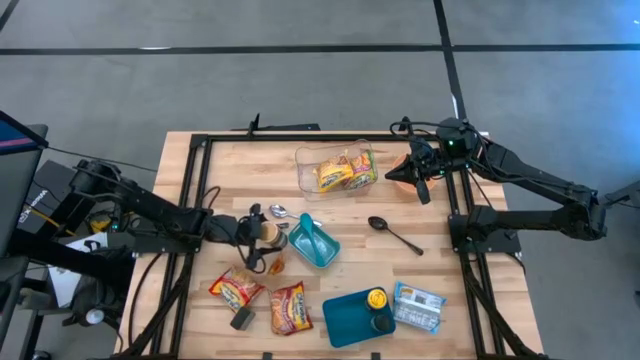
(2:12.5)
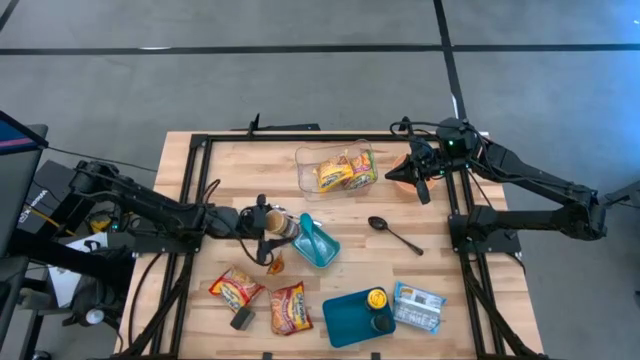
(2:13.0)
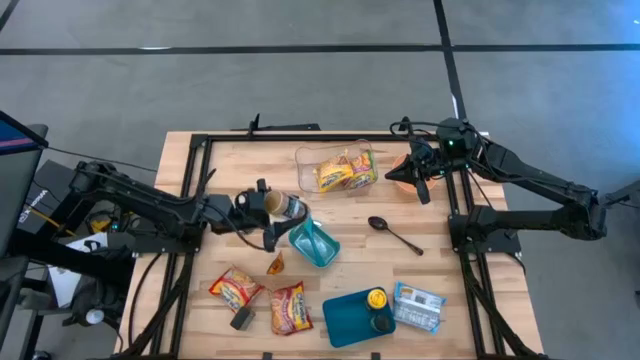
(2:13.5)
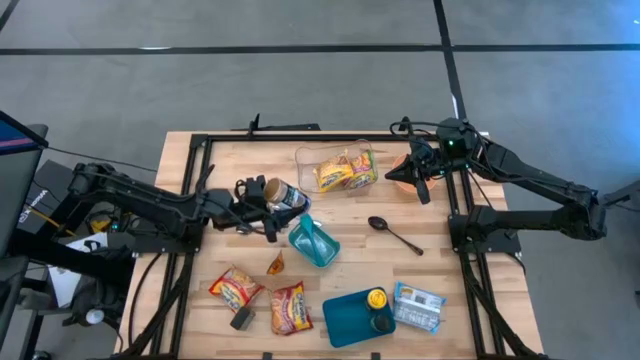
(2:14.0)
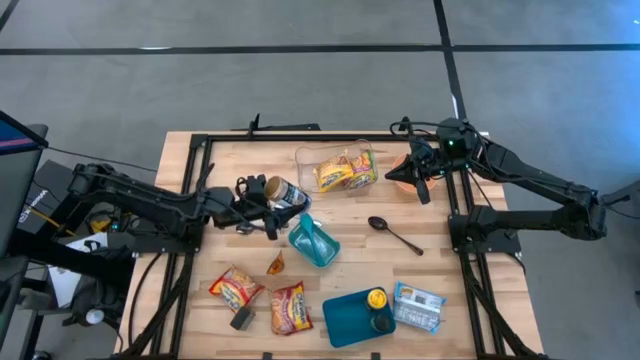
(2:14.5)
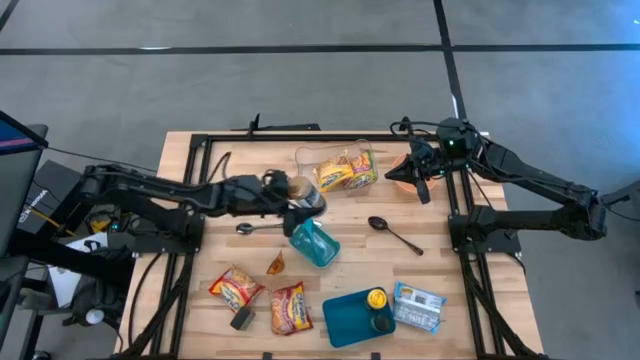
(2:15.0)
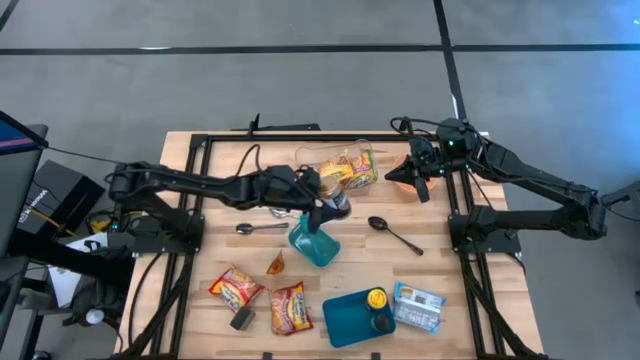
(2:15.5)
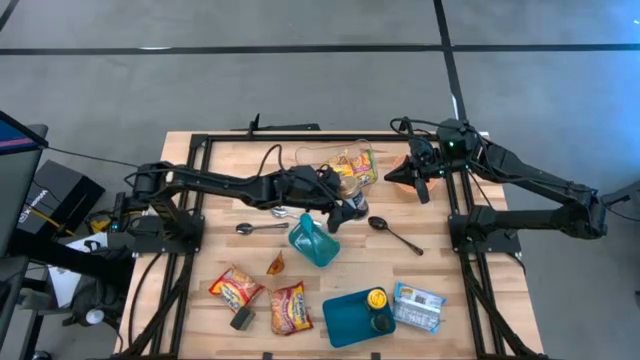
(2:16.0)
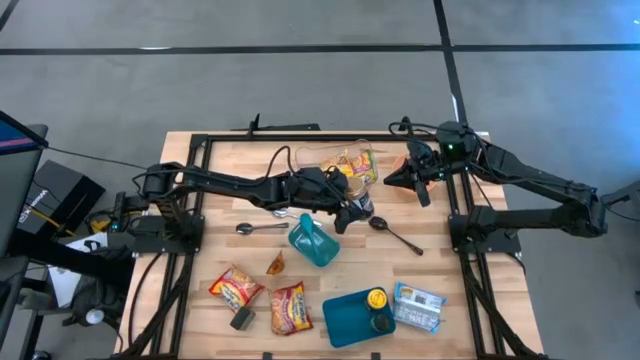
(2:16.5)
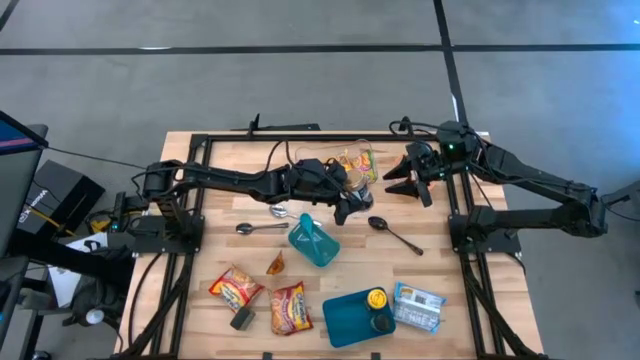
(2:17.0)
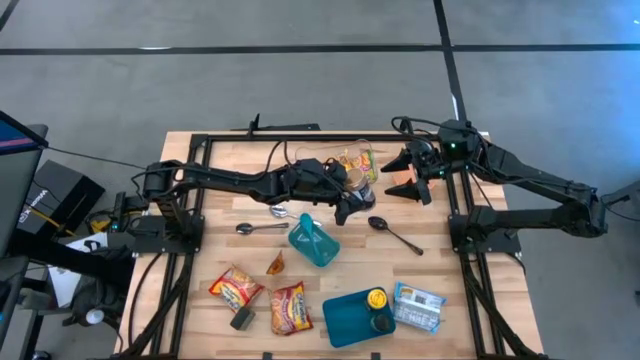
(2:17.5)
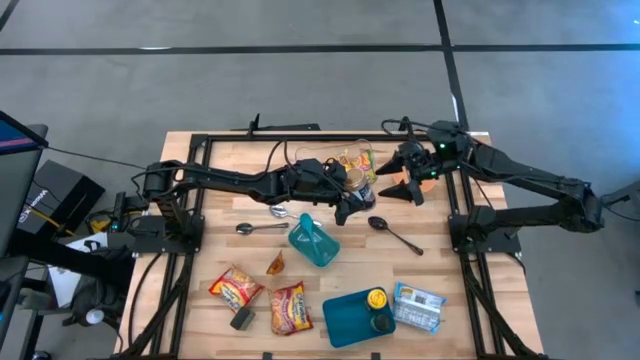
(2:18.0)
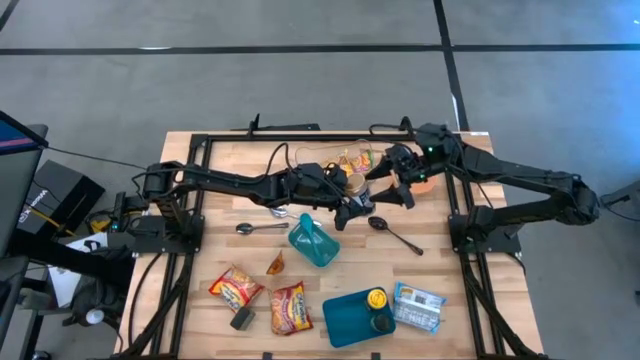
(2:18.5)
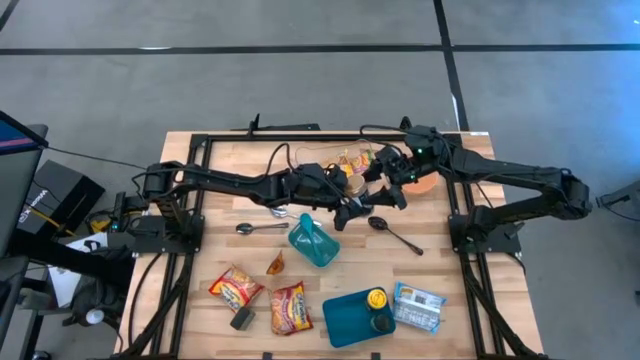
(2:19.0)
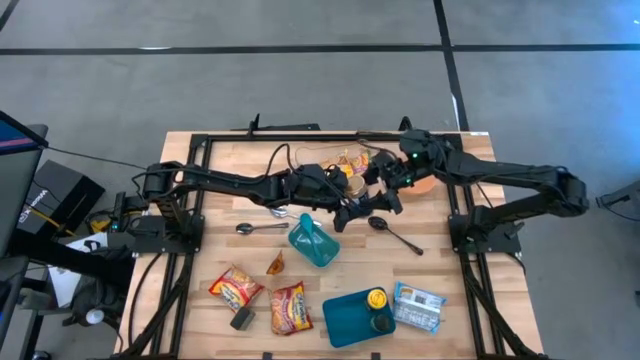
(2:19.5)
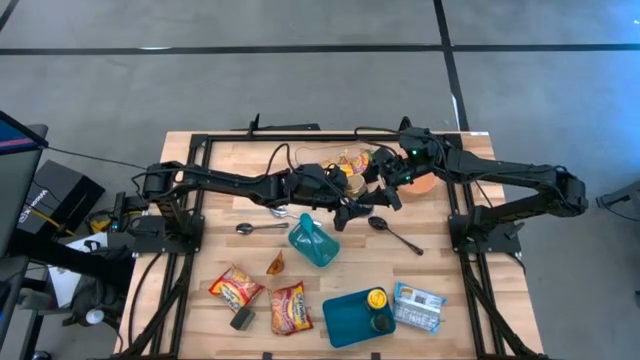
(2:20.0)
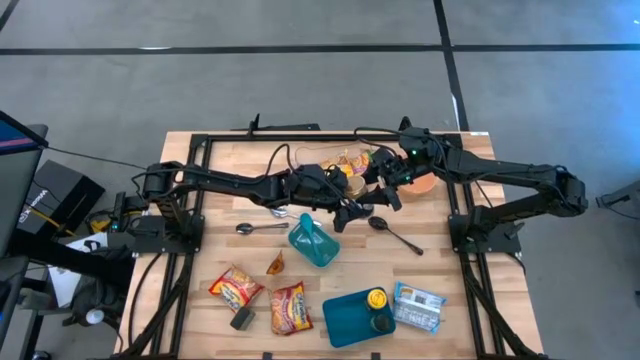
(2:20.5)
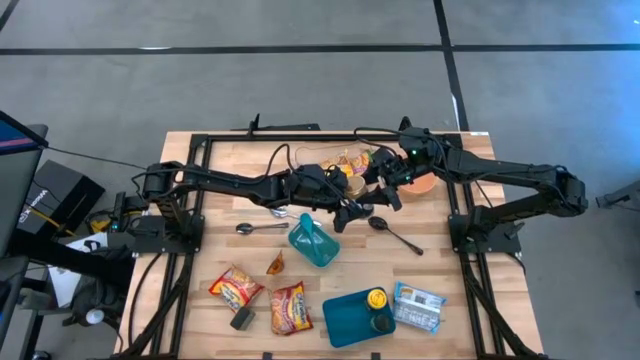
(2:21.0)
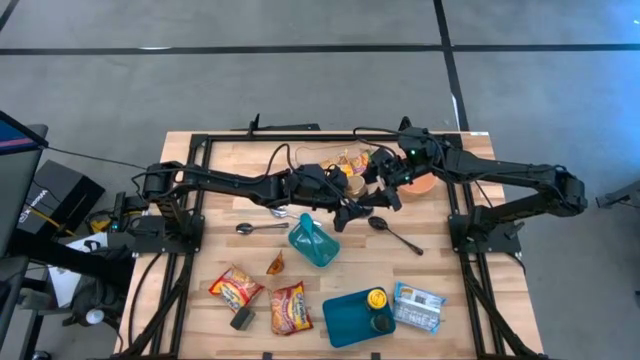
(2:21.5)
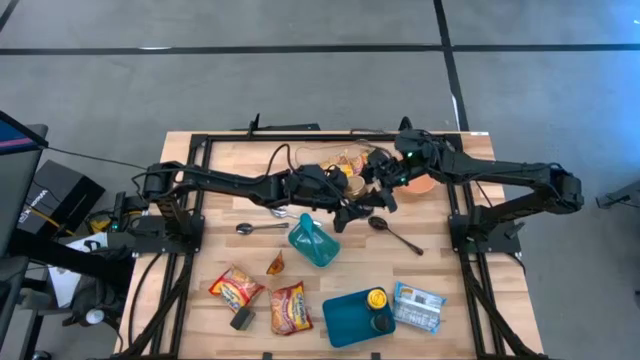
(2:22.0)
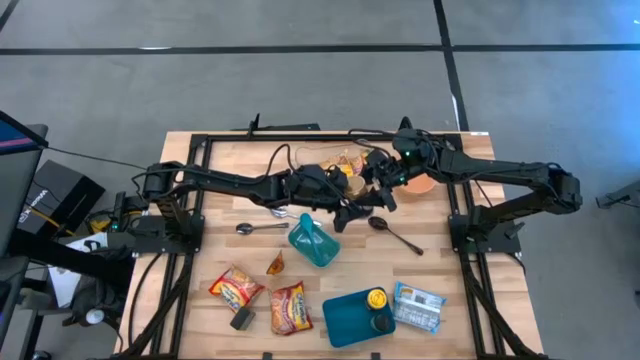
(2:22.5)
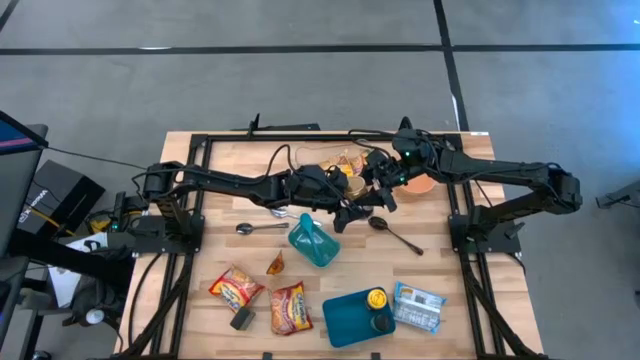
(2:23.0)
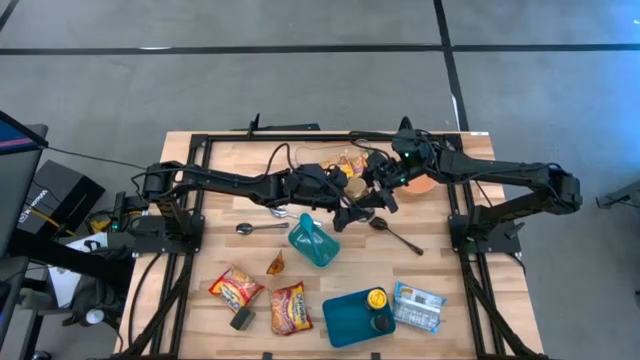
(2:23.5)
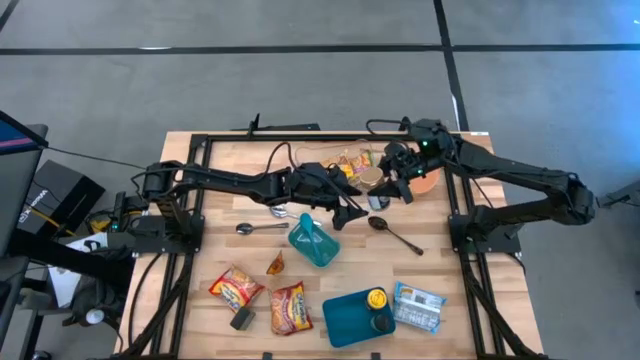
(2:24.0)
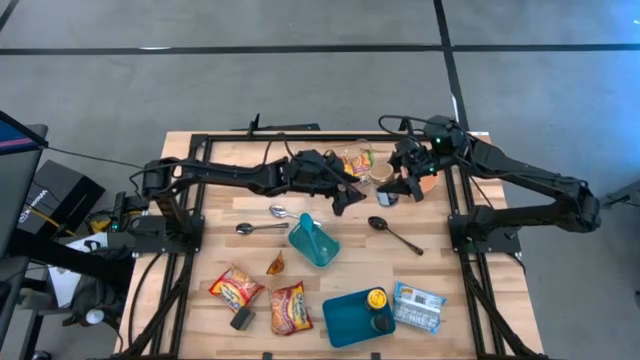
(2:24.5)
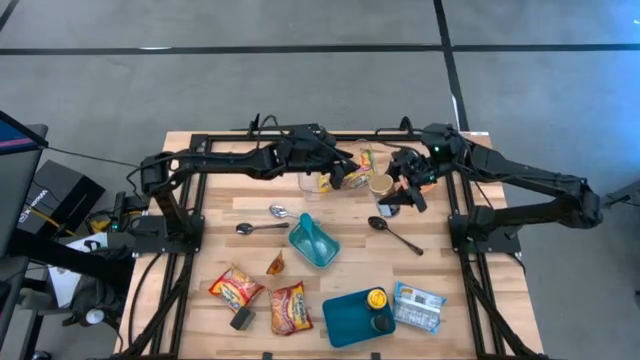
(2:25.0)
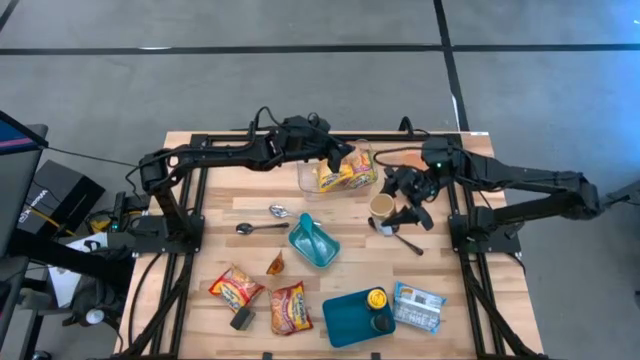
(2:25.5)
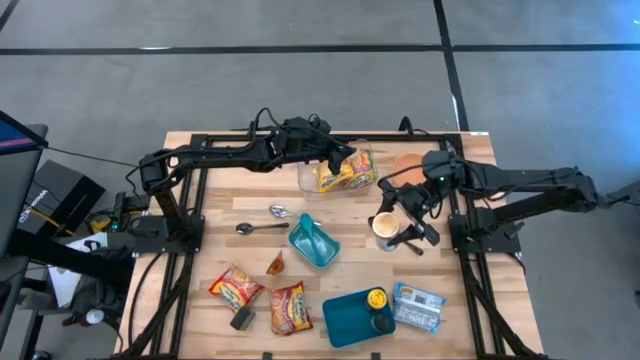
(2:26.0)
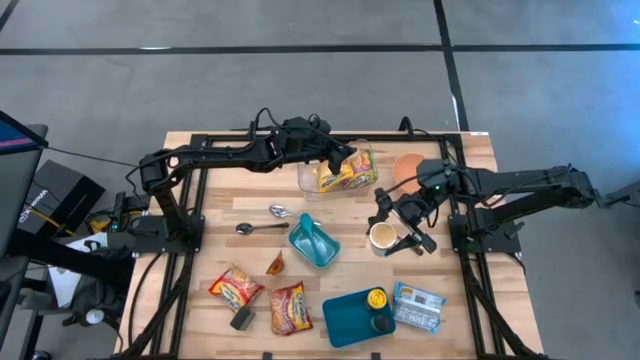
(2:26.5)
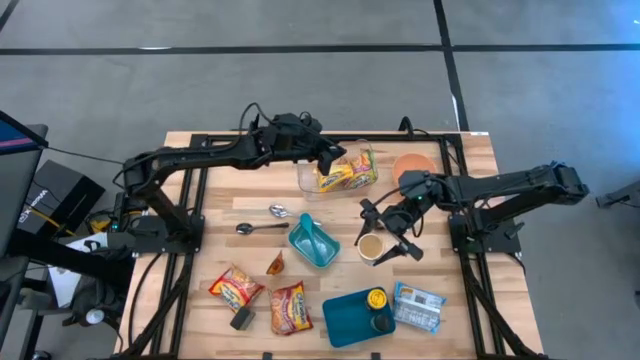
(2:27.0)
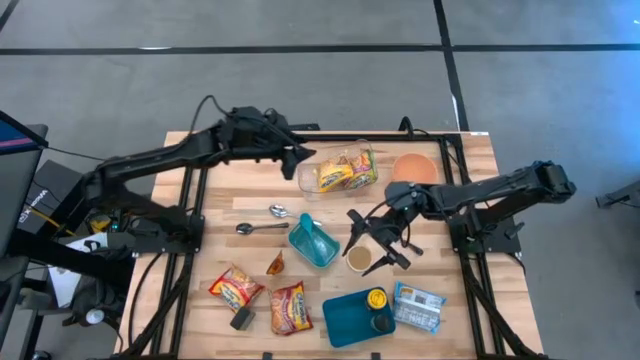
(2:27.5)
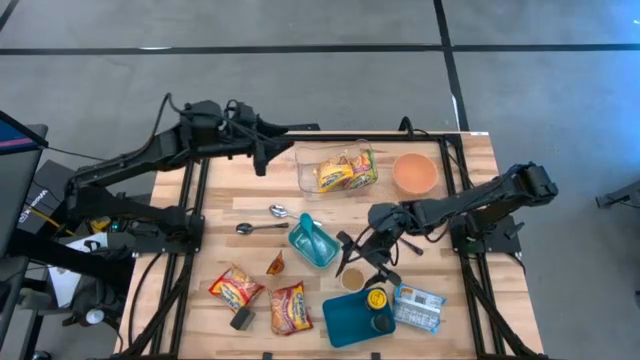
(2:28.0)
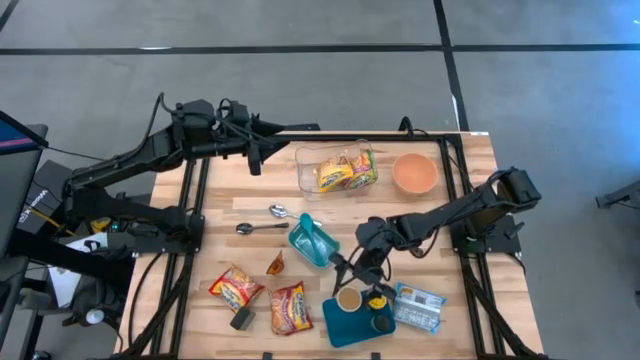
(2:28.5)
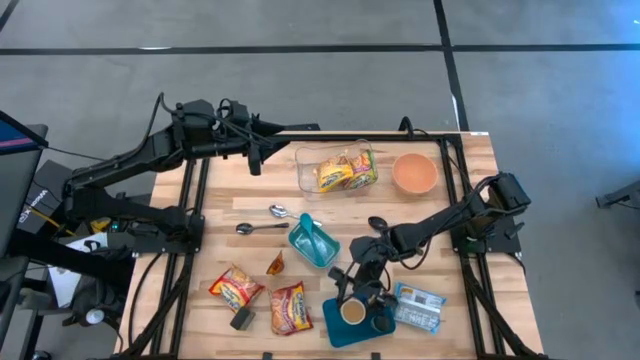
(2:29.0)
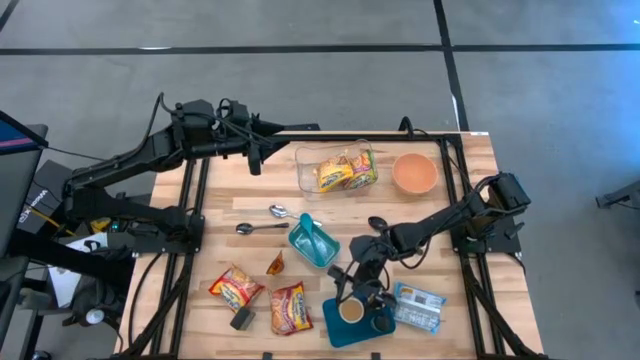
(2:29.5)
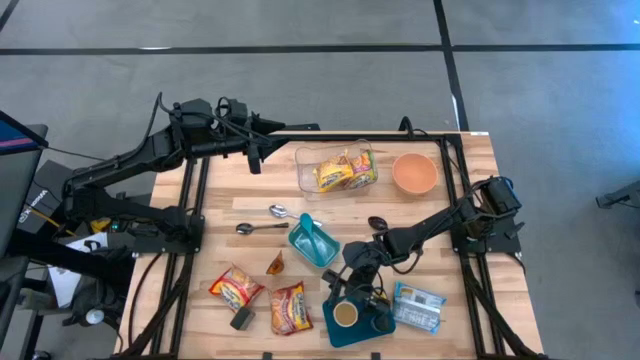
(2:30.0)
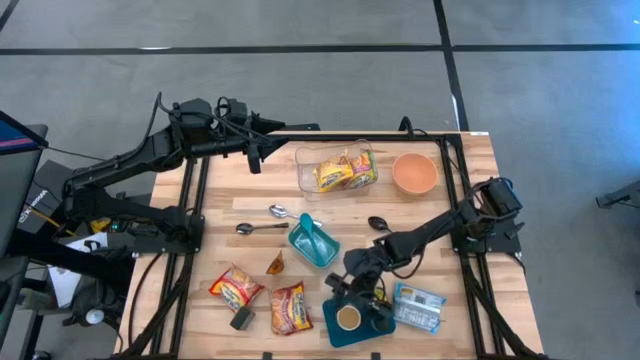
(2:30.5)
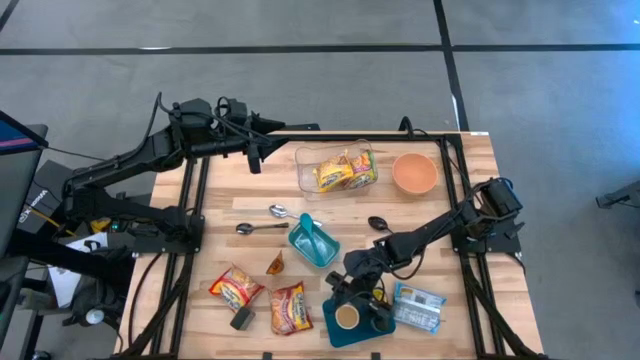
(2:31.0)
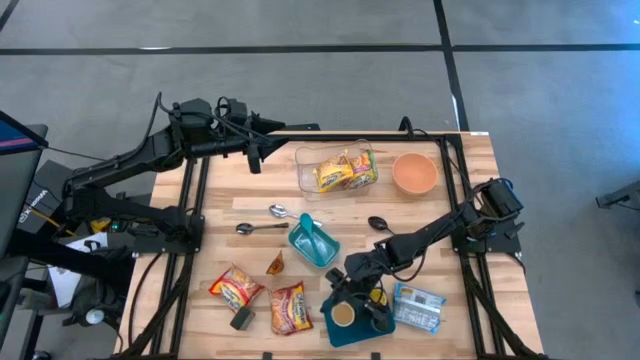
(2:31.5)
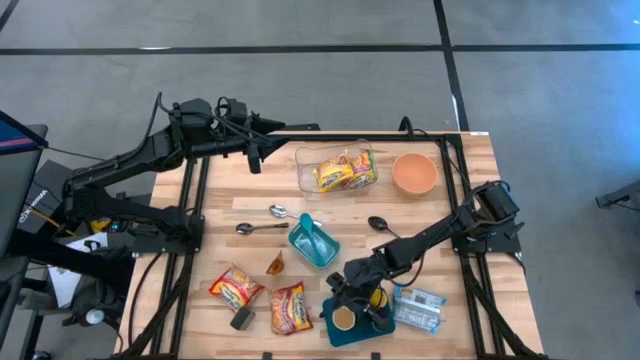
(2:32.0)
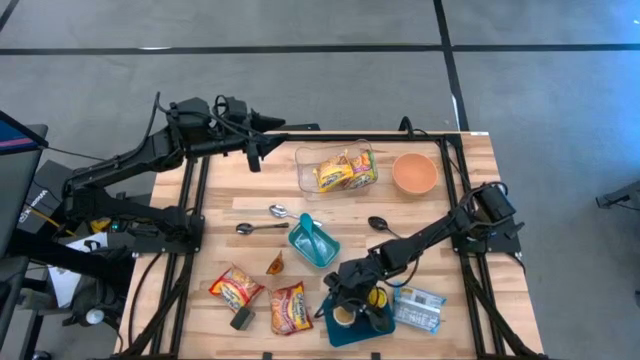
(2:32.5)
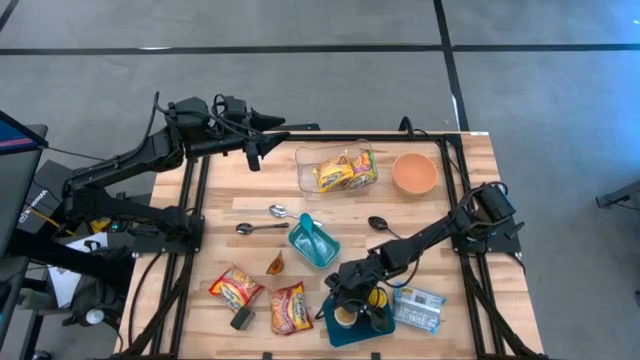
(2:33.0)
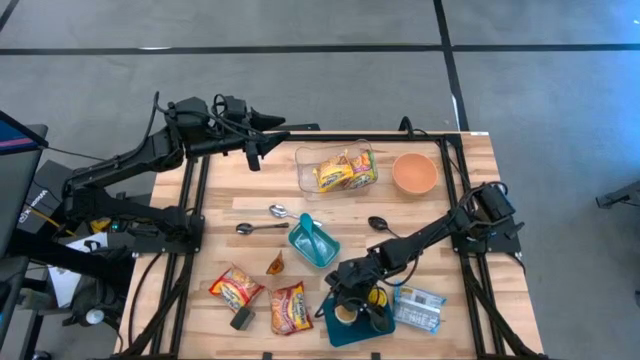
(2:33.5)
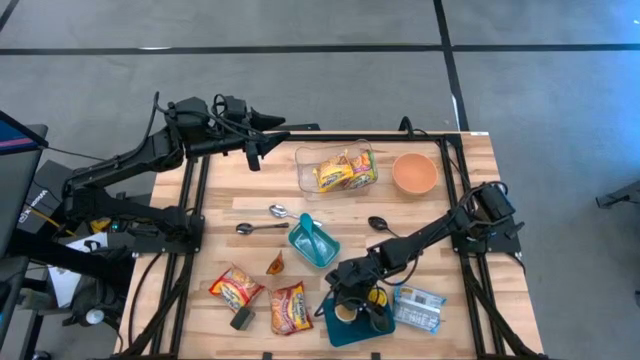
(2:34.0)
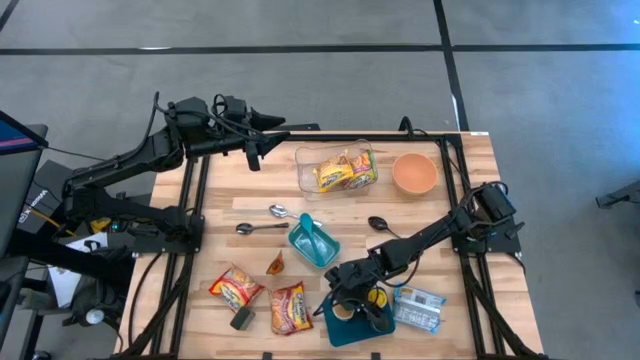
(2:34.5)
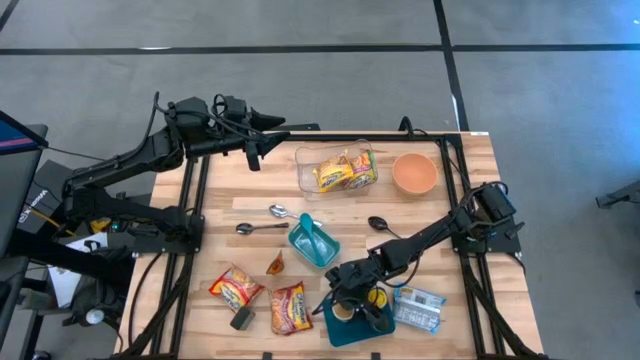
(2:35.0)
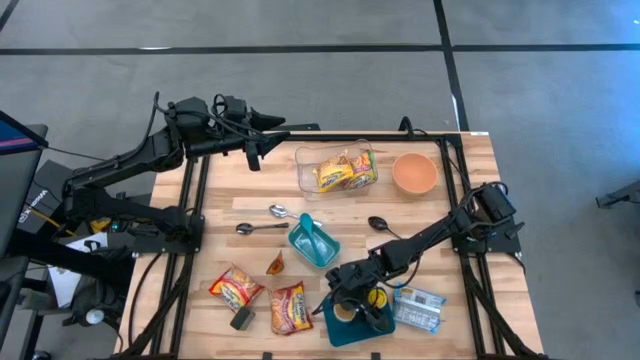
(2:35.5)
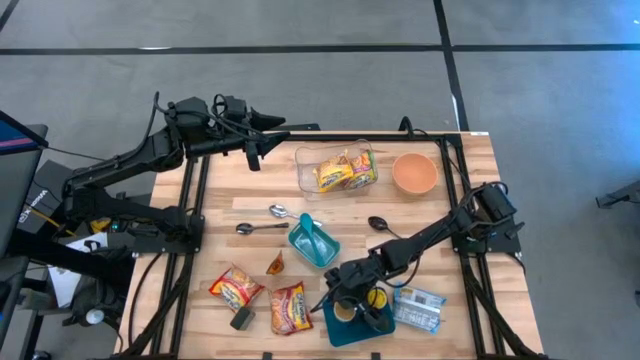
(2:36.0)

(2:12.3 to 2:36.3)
Task: Pick & Place Food Item
Put the golden seasoning bottle into the blue bin
